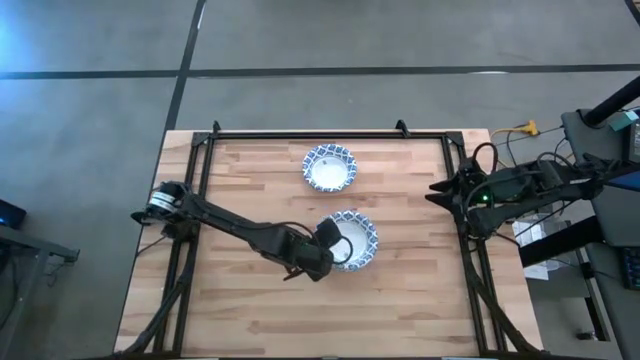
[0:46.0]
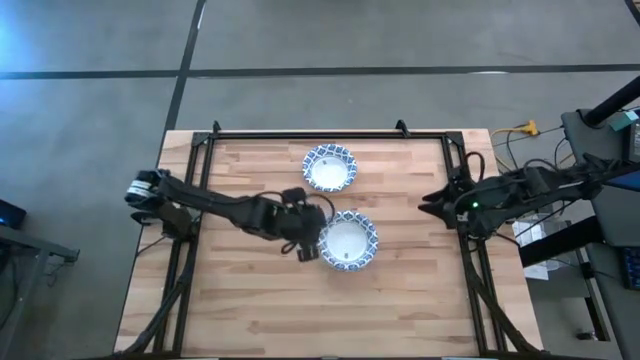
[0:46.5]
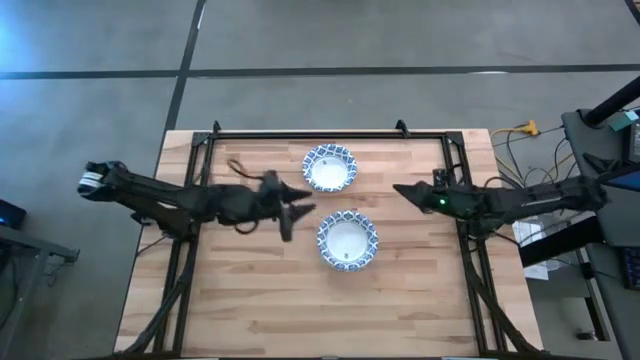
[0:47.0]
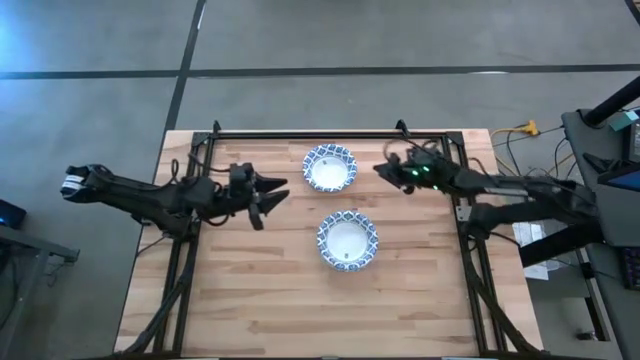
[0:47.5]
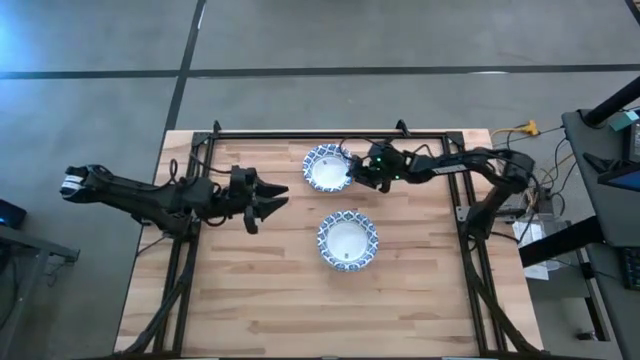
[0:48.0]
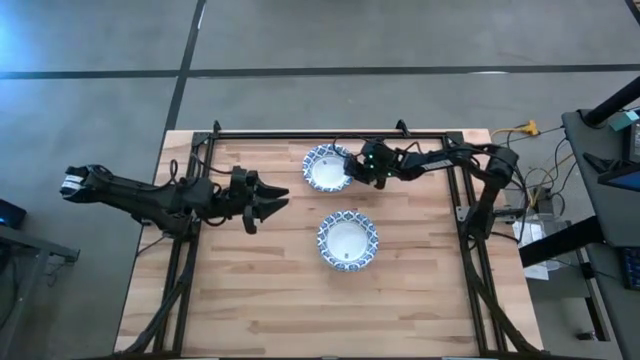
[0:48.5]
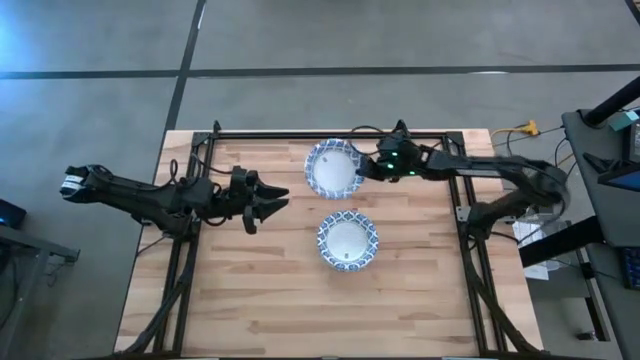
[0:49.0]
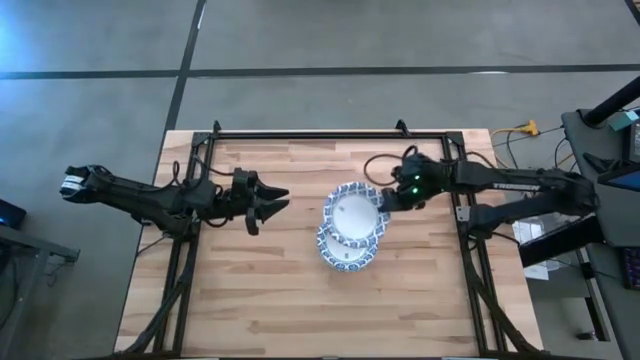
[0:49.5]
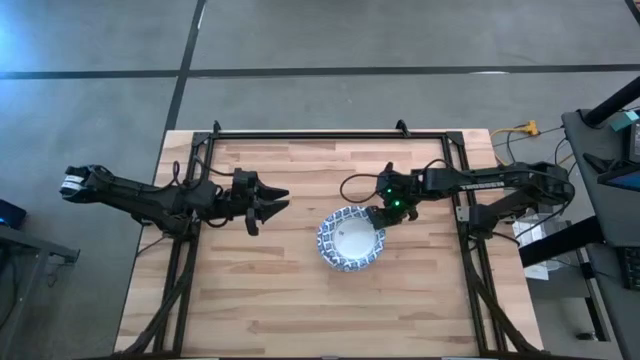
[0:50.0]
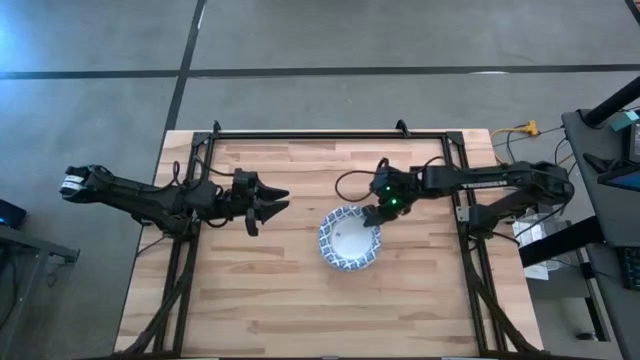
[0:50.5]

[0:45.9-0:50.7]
Task: Nest bowls inside each other
Stack the blue paper bowl into the blue paper bowl

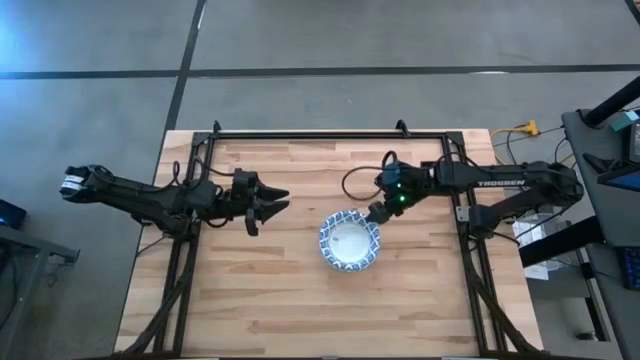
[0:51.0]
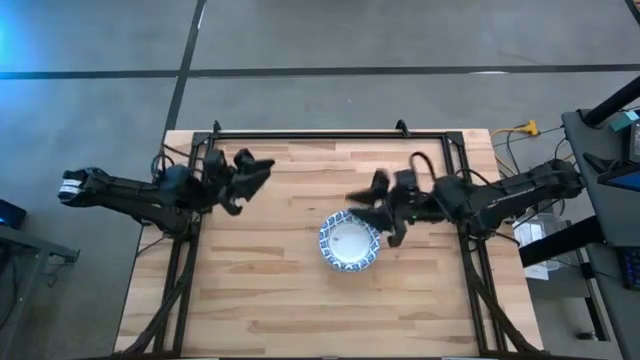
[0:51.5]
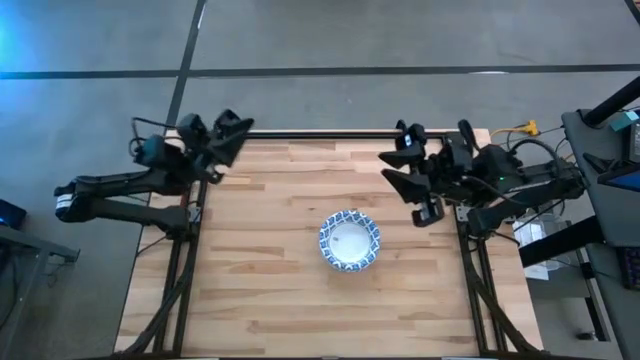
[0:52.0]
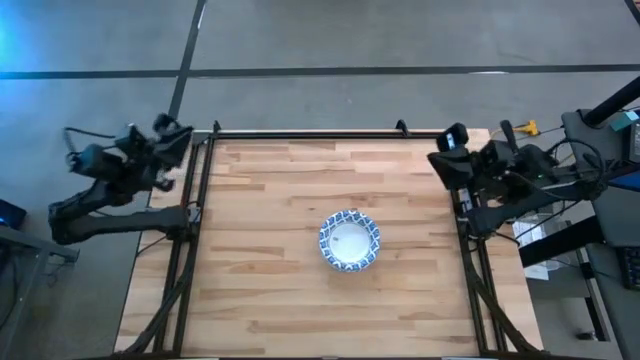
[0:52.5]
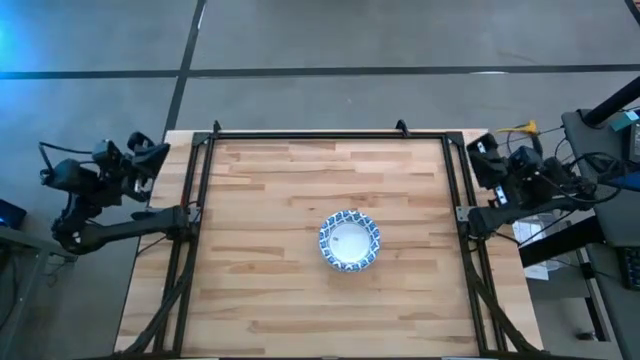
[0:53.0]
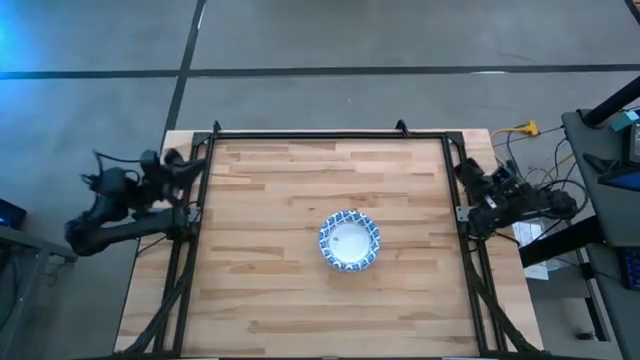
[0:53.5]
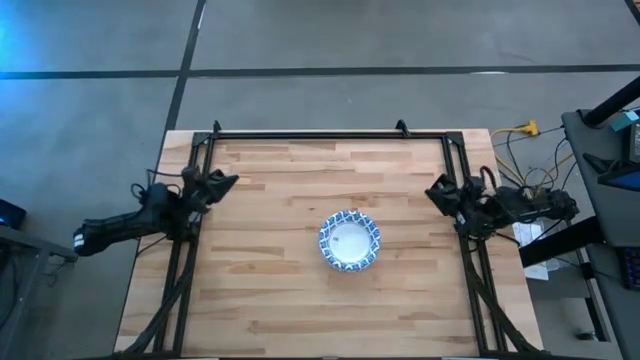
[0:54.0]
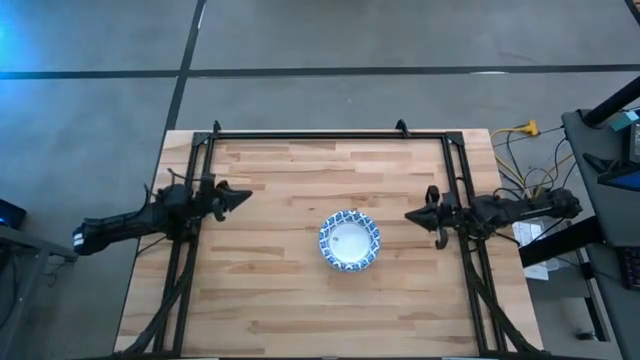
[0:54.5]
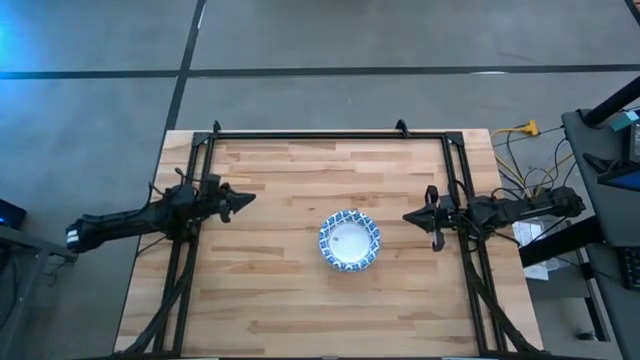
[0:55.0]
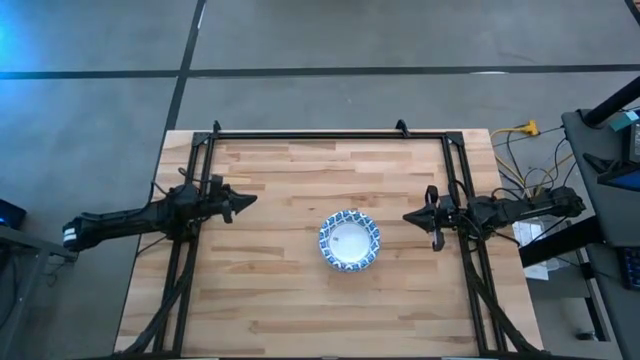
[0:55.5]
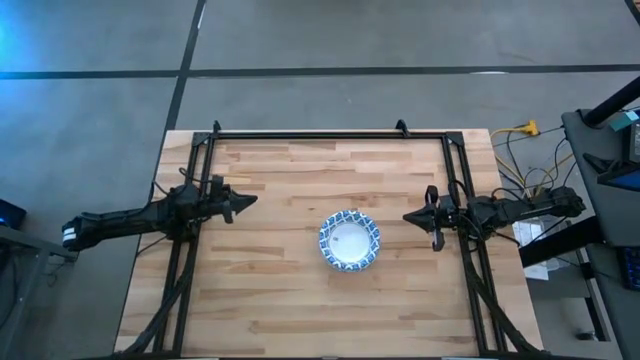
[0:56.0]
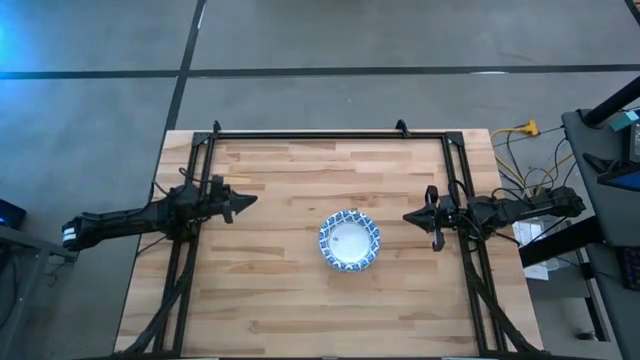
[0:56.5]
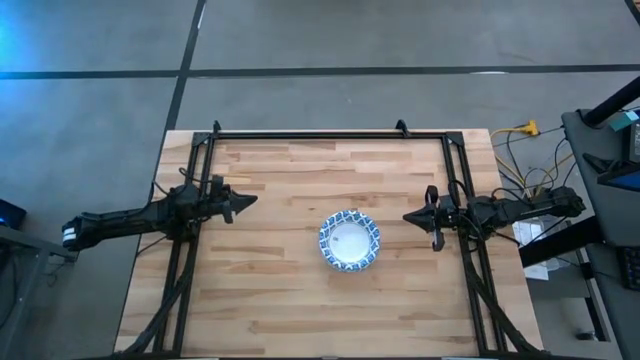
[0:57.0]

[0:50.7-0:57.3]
Return to Home Position

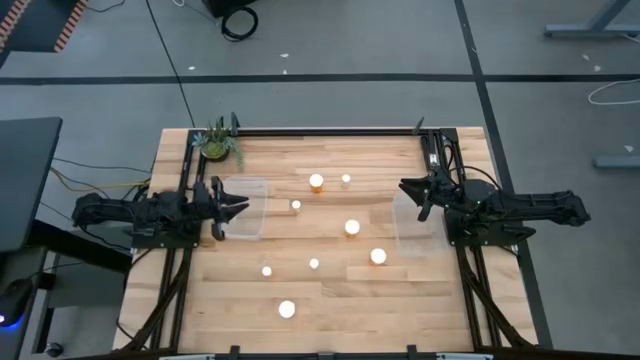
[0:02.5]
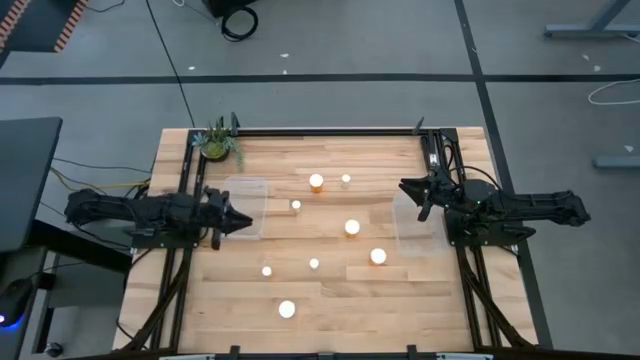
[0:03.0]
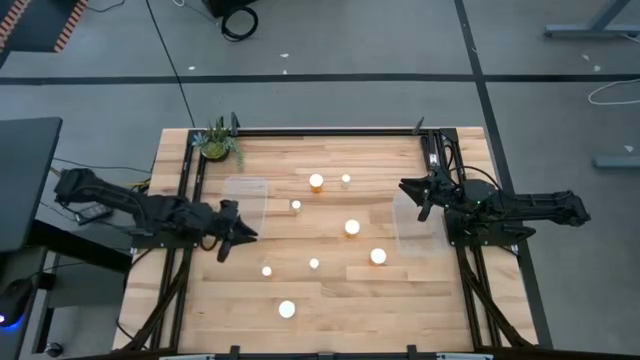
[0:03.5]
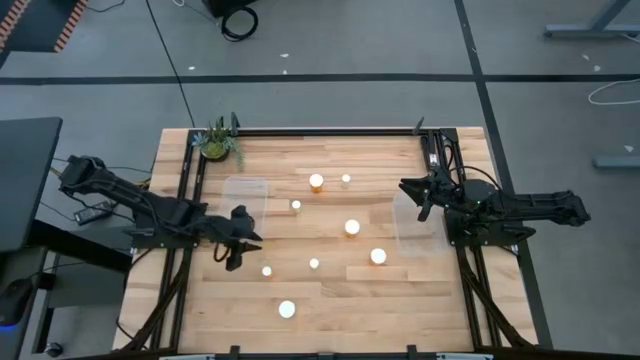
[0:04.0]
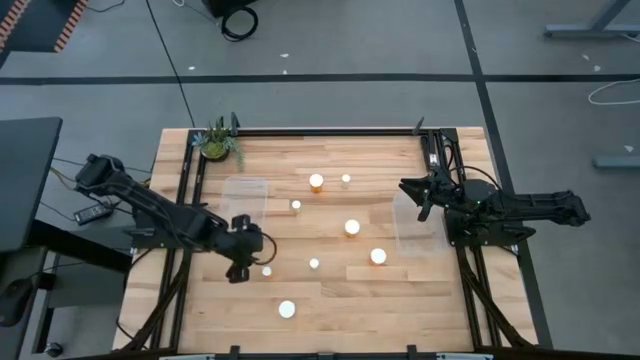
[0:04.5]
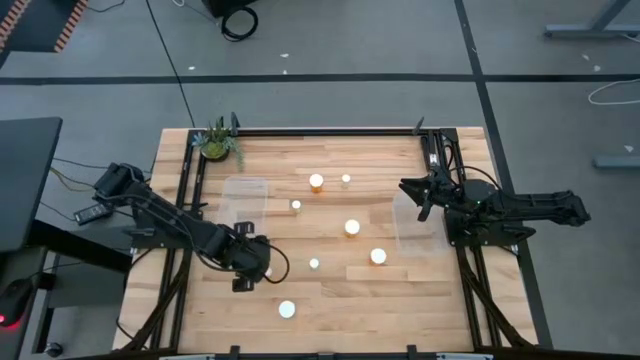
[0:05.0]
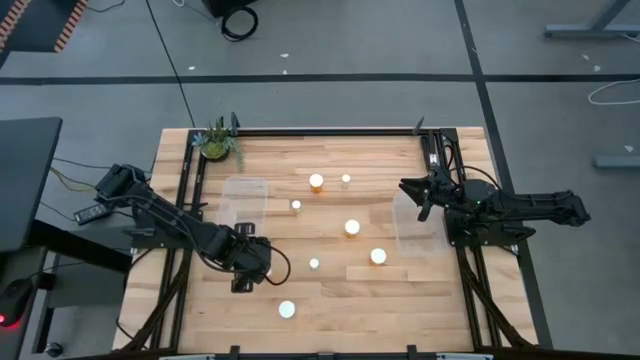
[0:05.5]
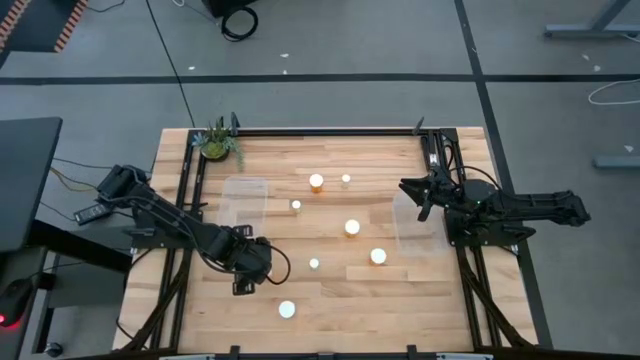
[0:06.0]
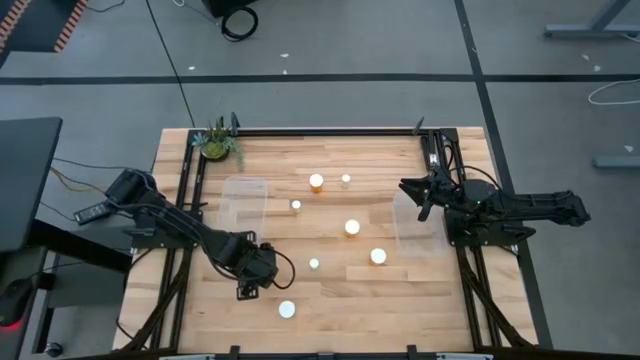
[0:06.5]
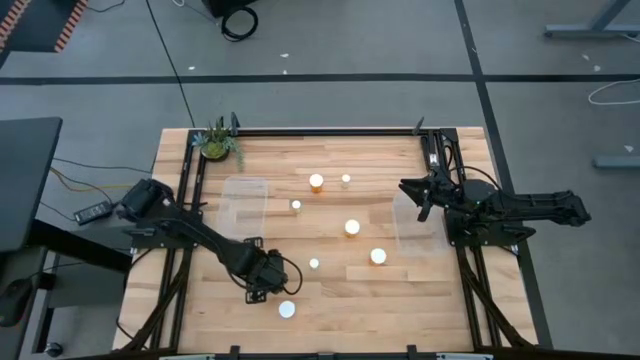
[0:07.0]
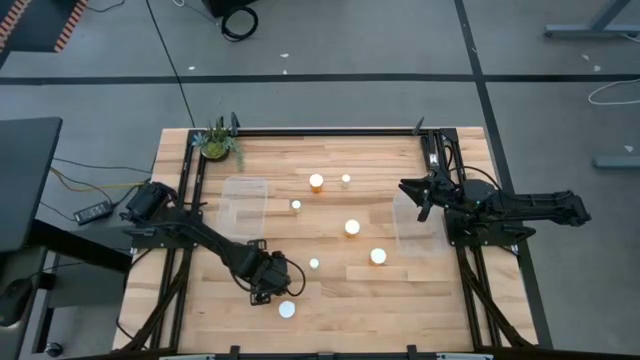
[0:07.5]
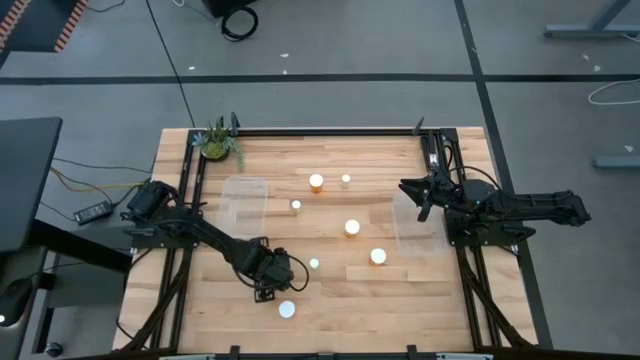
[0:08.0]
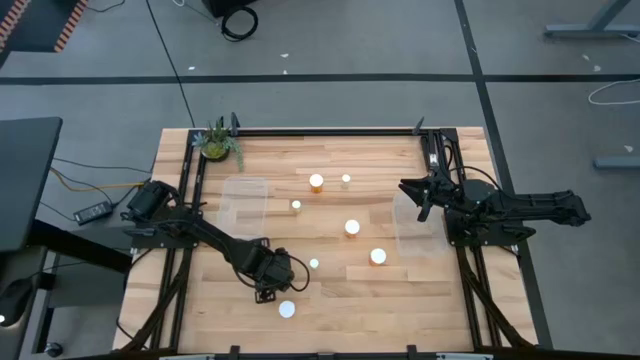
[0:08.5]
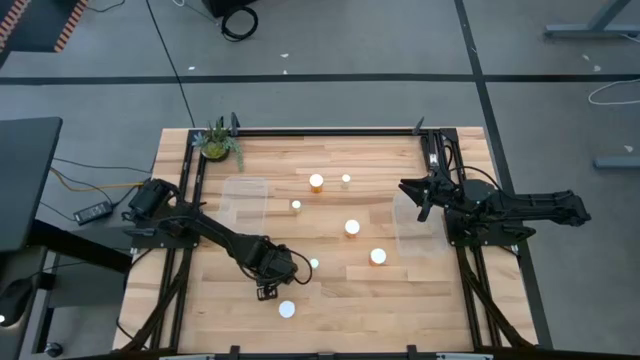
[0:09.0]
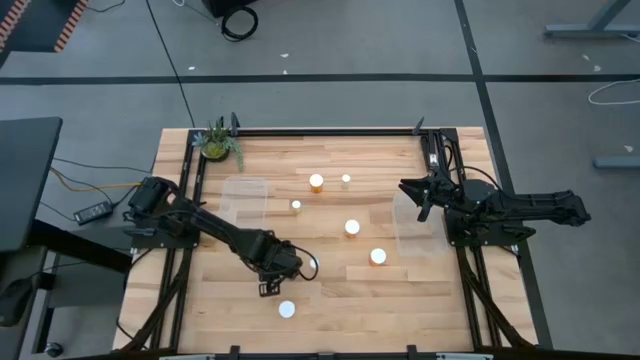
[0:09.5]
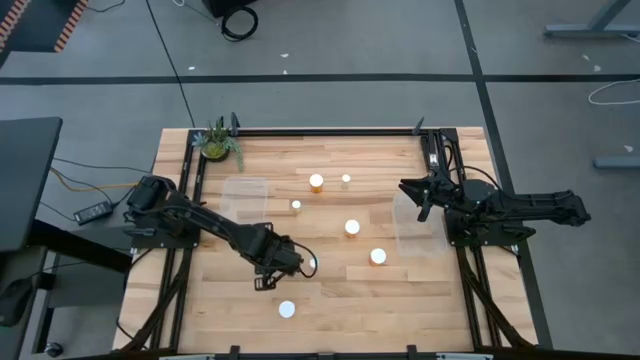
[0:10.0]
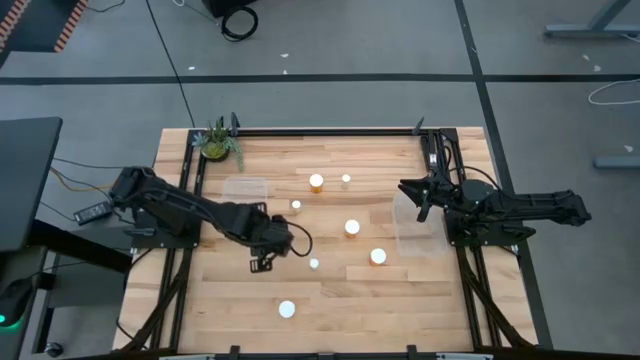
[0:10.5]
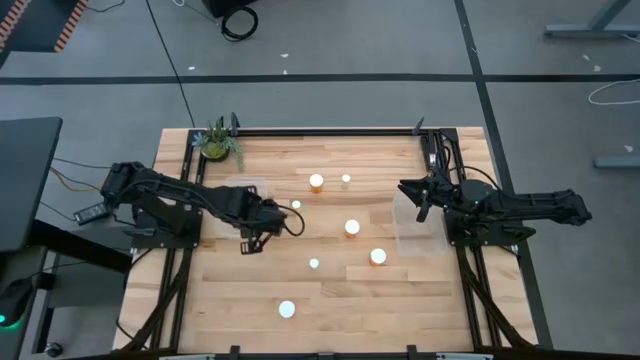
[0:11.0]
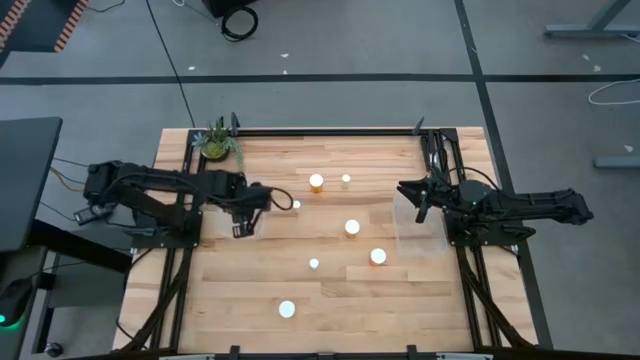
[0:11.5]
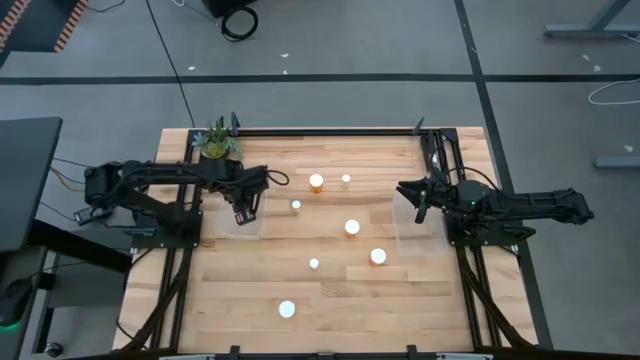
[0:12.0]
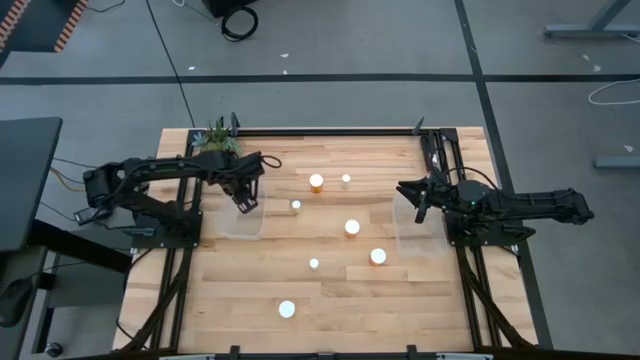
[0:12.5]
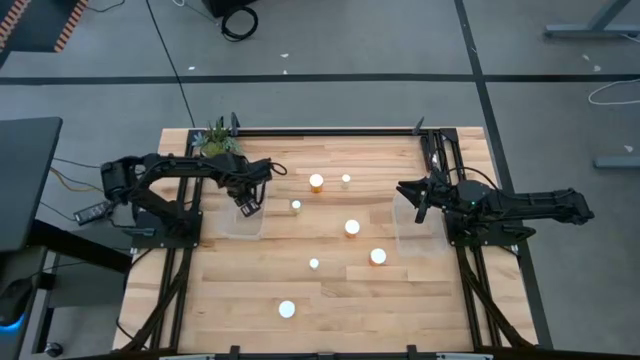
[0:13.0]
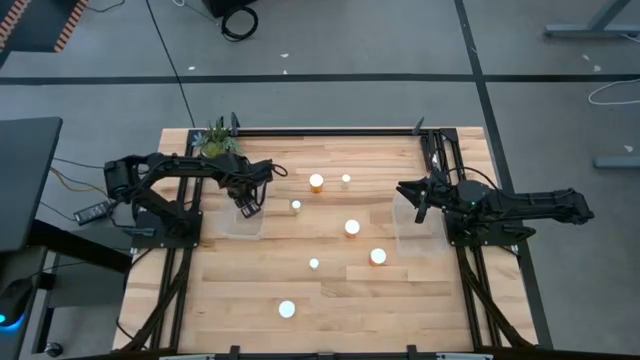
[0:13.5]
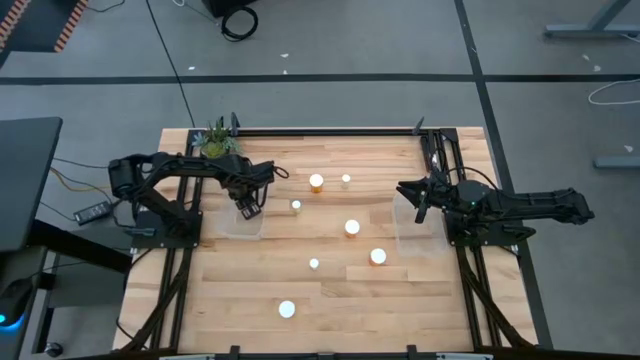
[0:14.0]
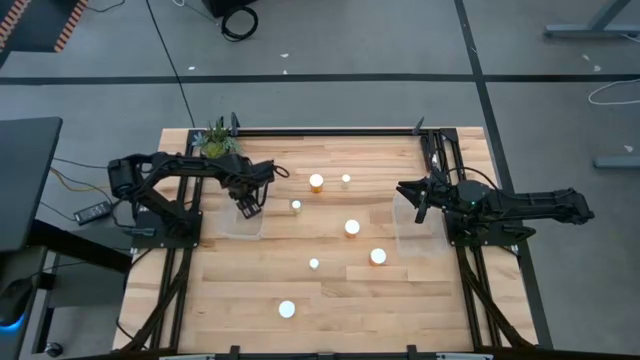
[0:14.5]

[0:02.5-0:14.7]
Task: Pick and place medicine bottles into bin by pill shape (circle, oval)
Put the small orange pill bottle into the left transparent bin
